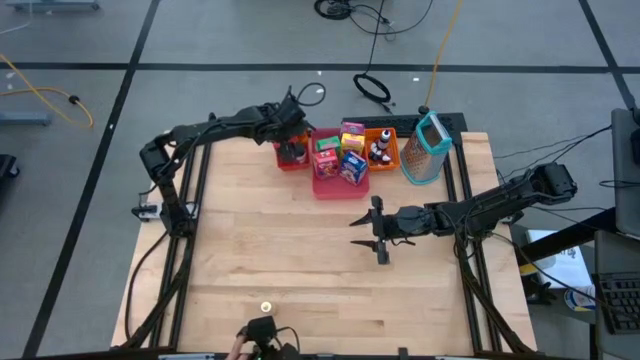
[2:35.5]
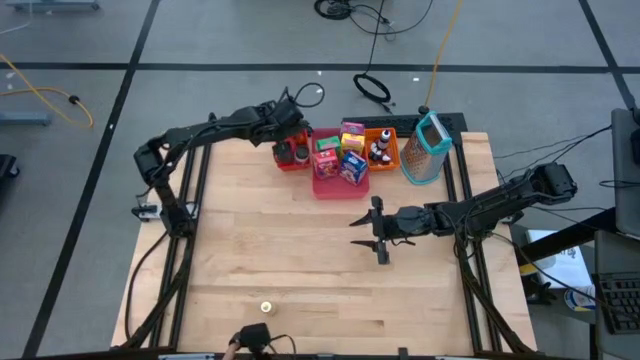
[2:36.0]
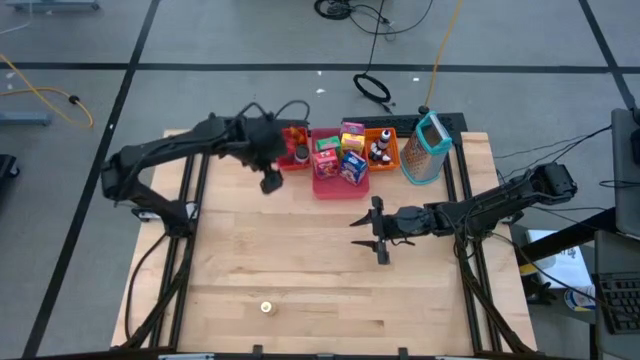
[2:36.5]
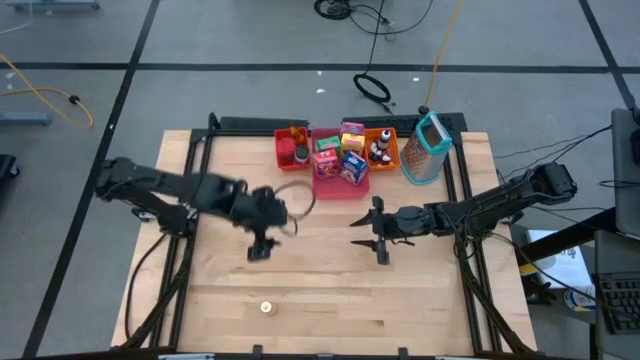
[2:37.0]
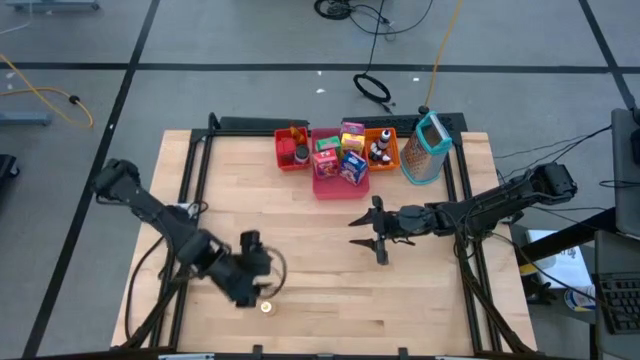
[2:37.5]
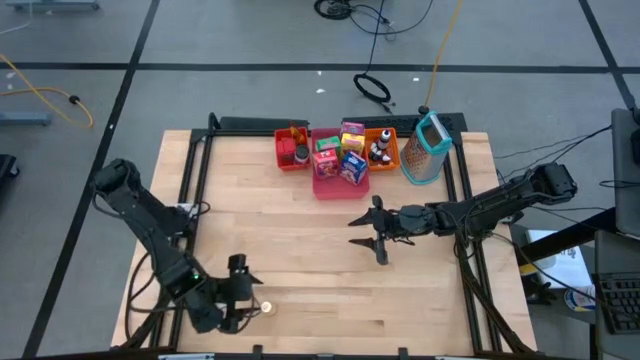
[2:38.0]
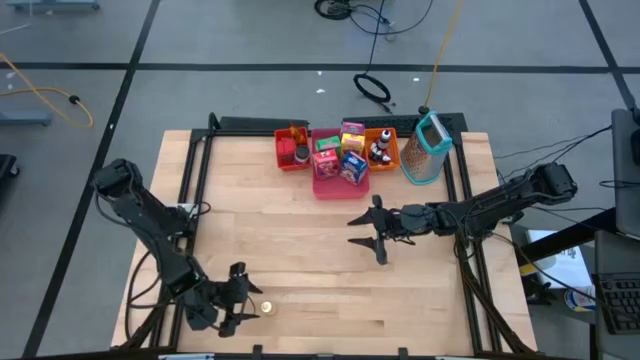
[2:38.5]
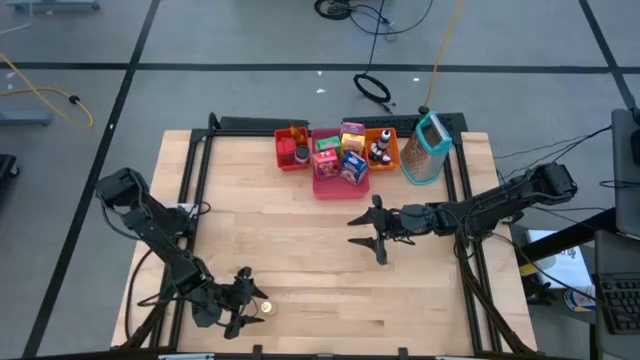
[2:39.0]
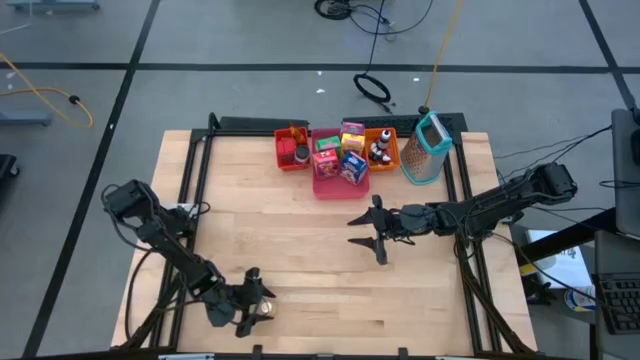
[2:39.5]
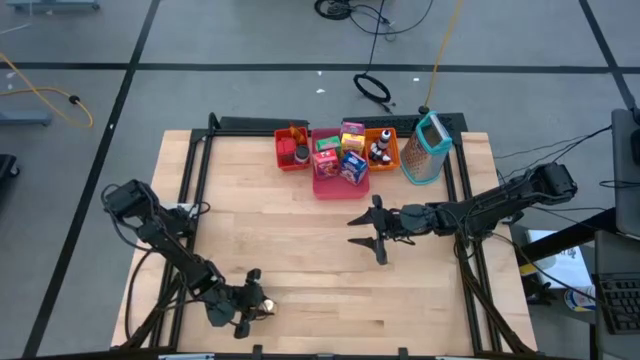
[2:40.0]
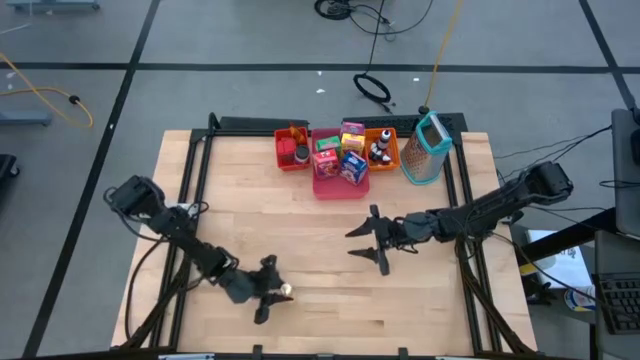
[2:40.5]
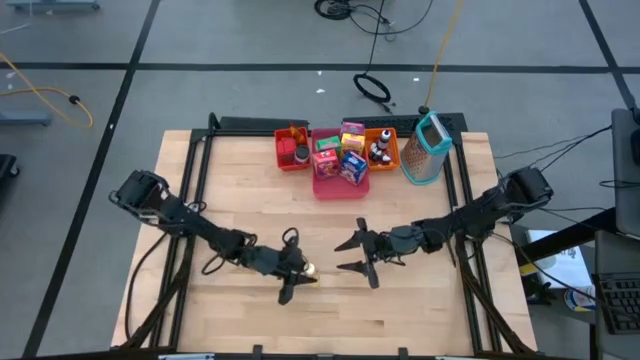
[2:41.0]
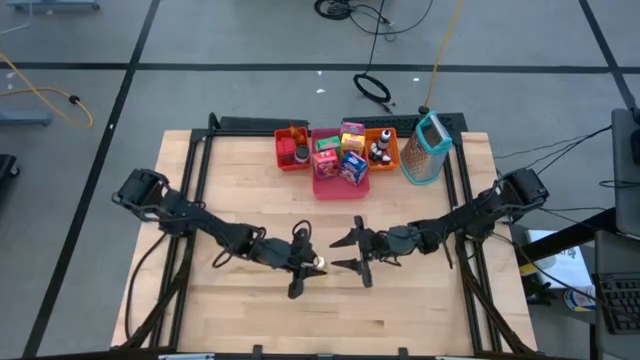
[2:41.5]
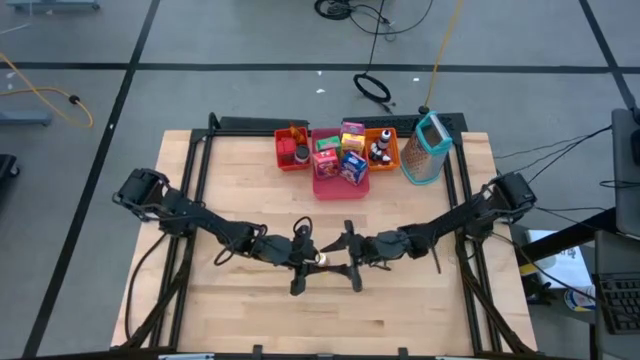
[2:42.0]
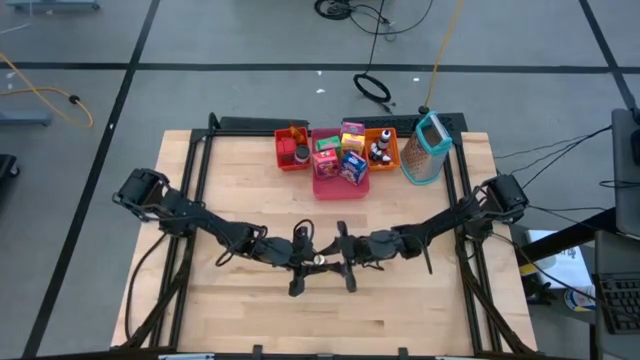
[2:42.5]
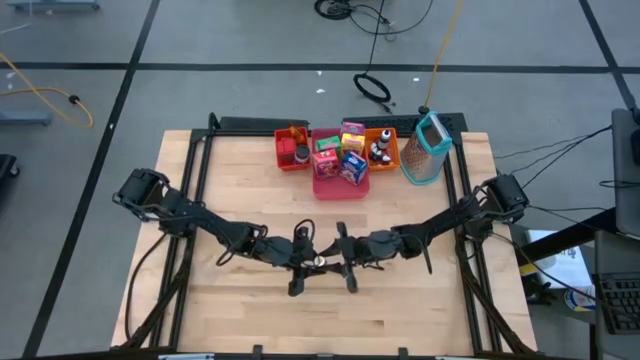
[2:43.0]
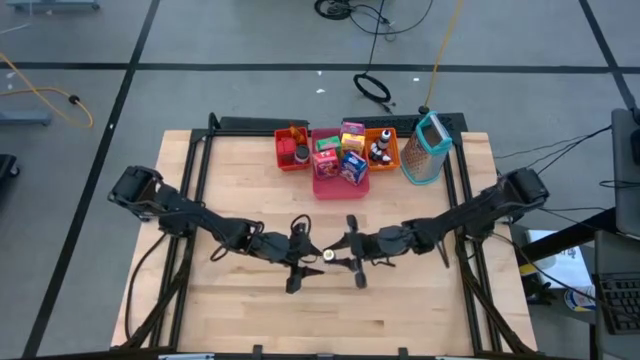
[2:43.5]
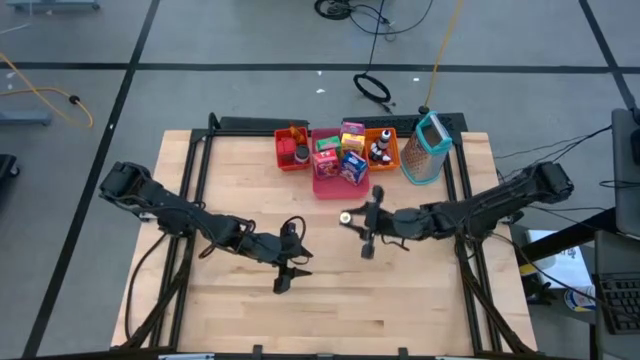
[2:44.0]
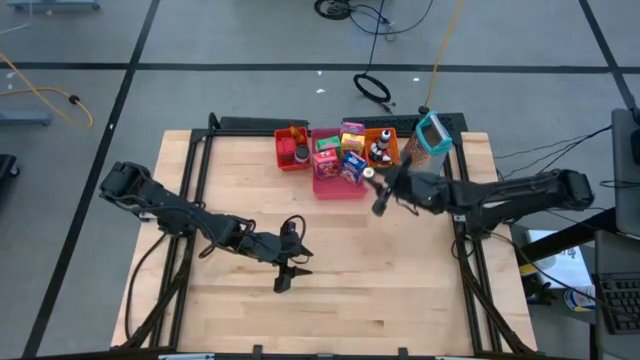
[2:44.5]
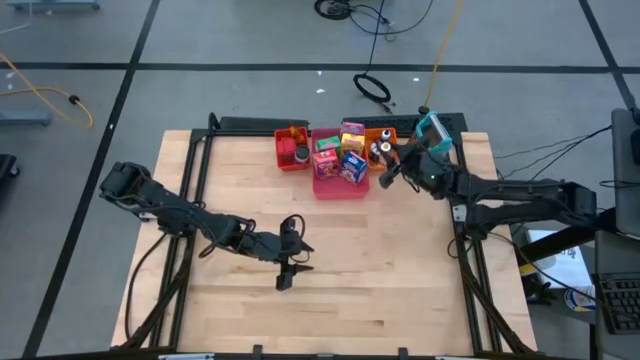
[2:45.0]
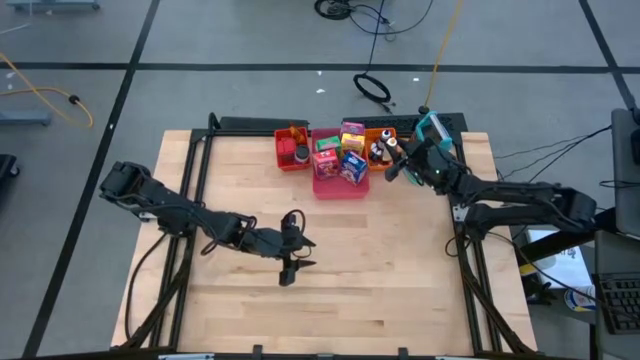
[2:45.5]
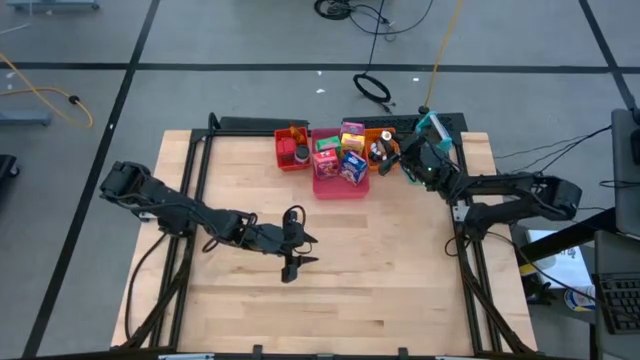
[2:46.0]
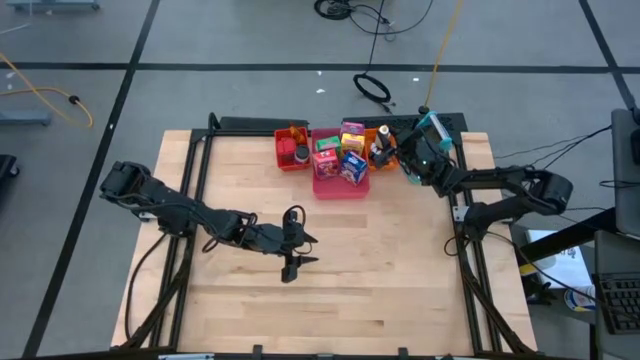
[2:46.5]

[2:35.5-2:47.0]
Task: Pick & Place Kitchen Items
Put the yellow food coloring bottle into the orange bin

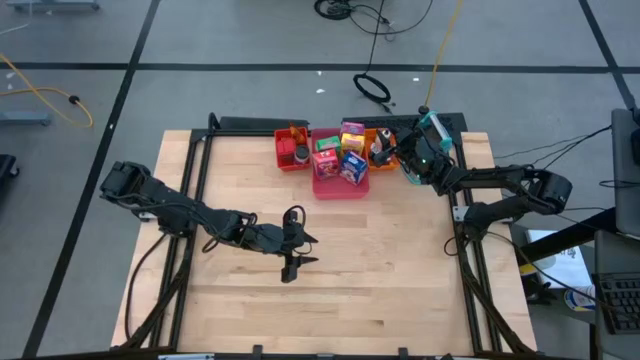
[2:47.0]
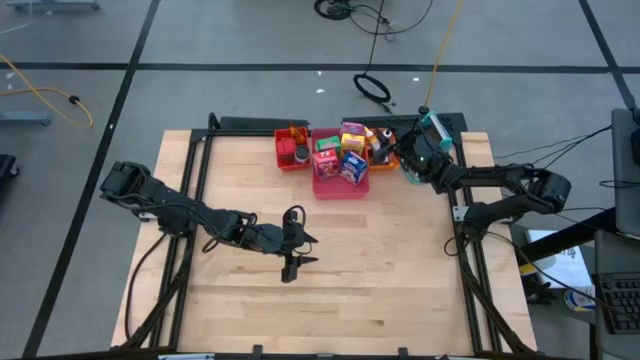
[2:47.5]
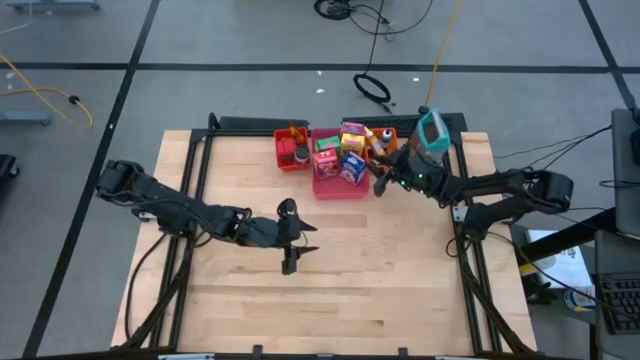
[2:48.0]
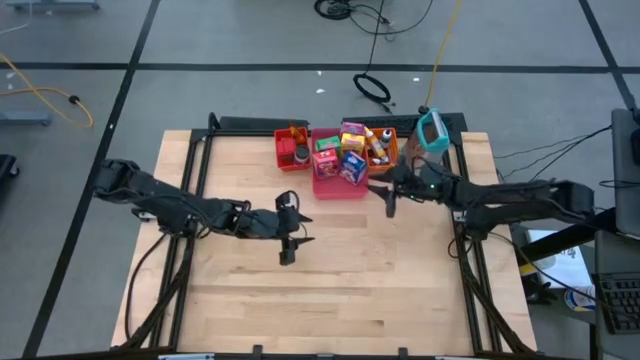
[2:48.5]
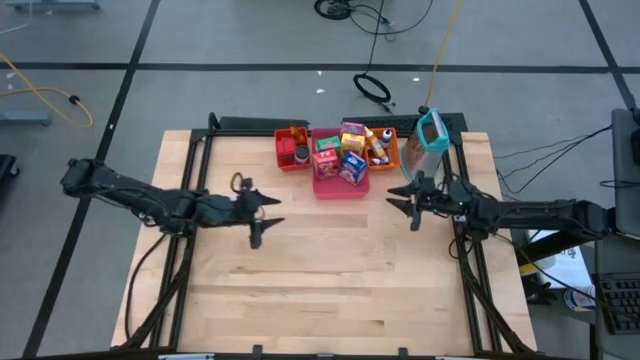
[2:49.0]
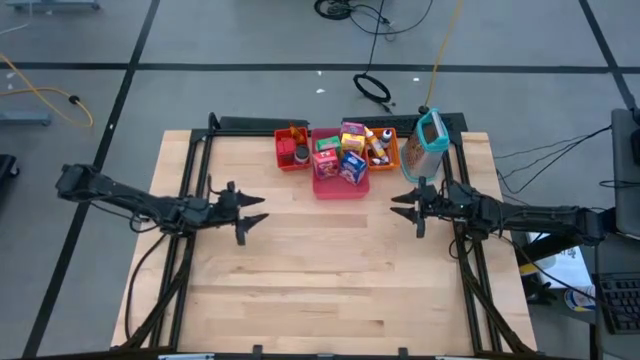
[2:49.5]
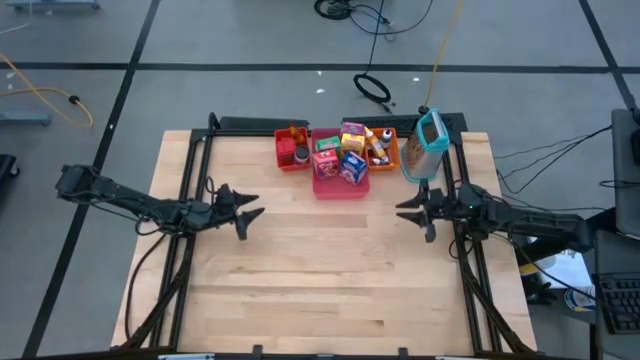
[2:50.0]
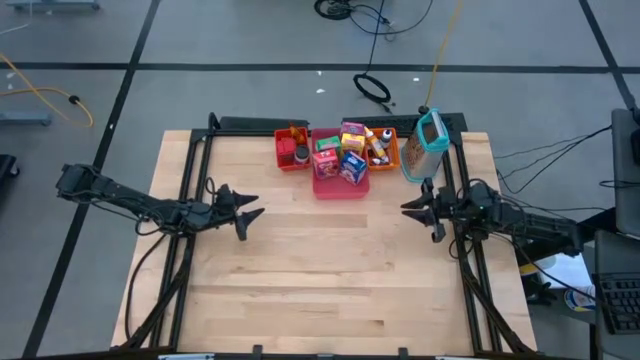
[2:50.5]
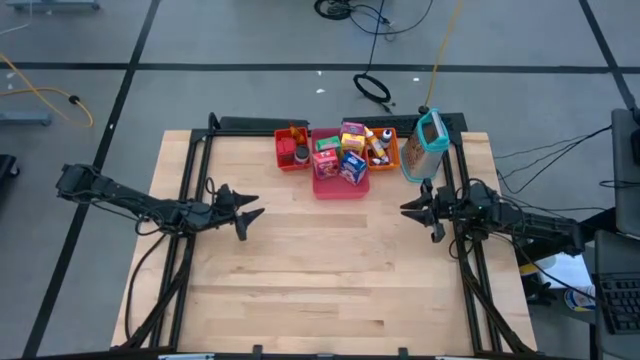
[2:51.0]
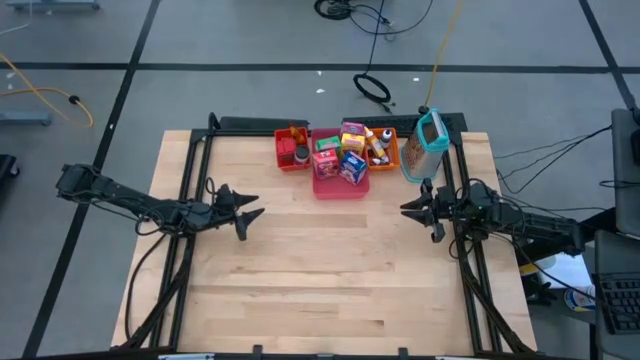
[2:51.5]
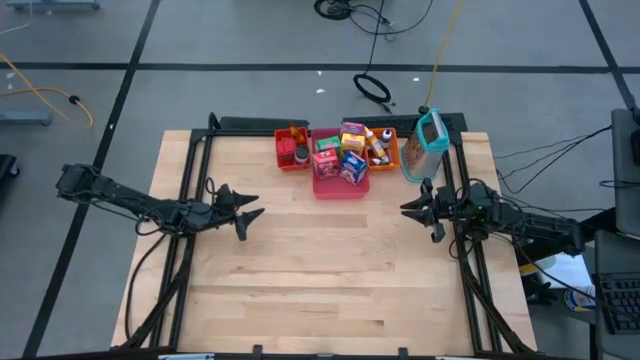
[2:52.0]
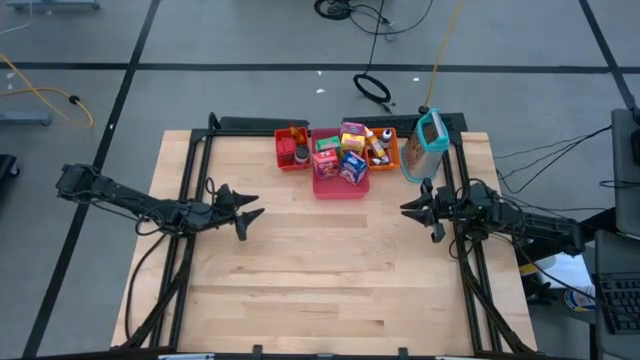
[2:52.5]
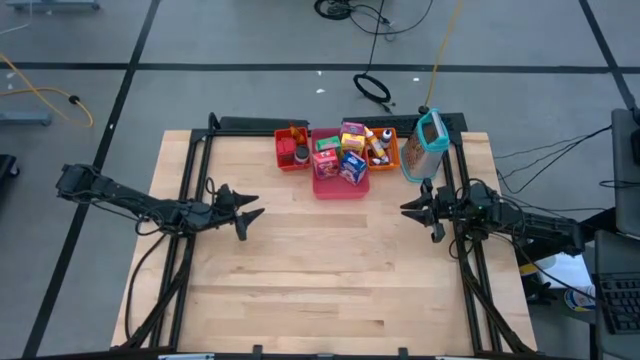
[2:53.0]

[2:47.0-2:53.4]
Return to Home Position

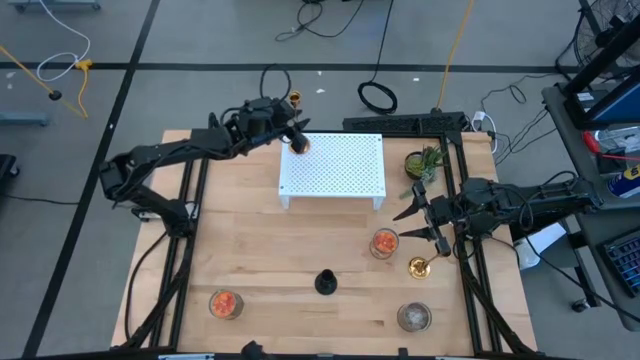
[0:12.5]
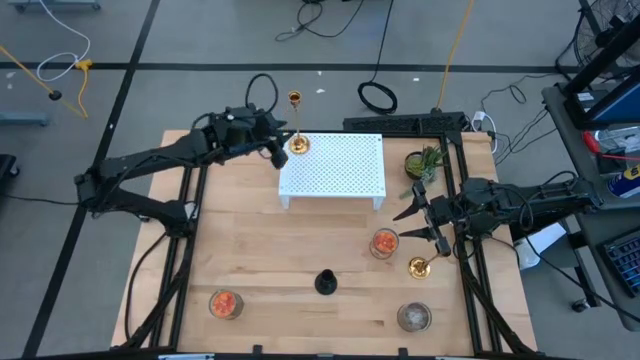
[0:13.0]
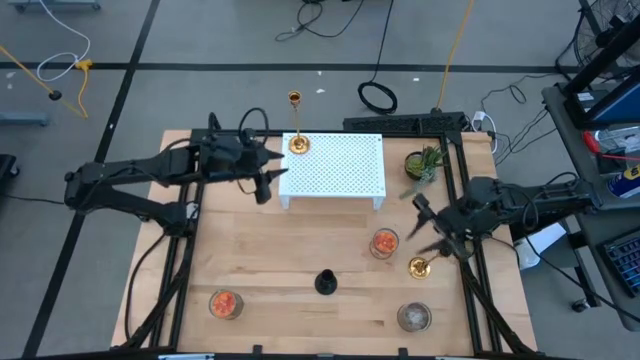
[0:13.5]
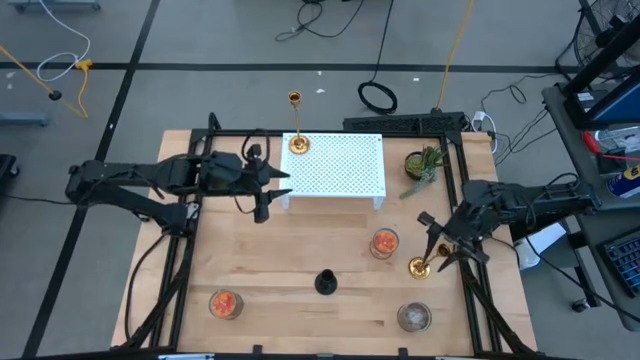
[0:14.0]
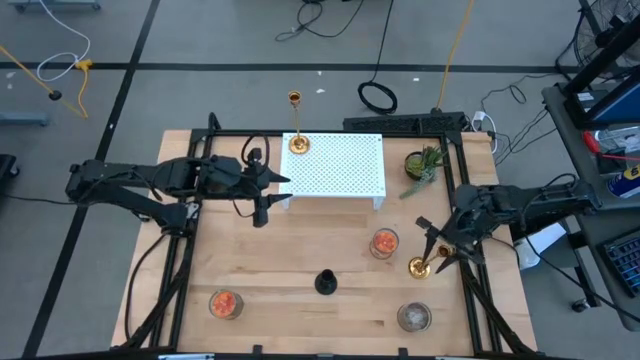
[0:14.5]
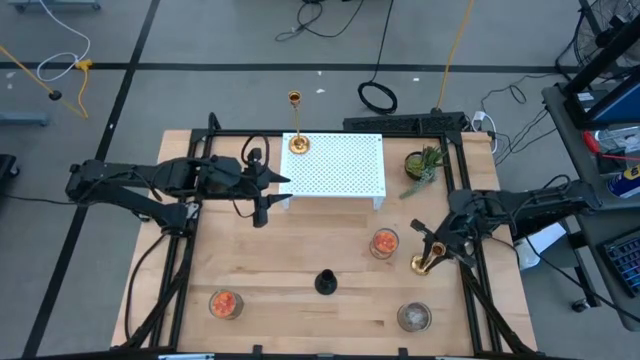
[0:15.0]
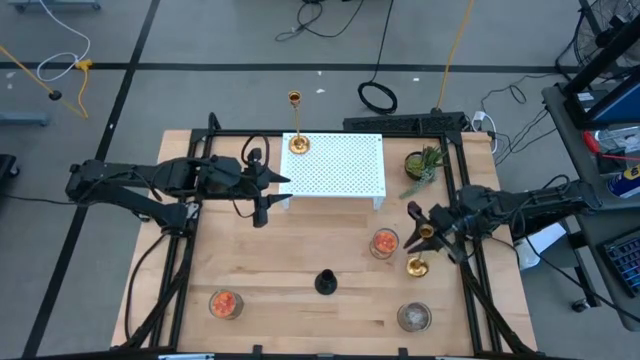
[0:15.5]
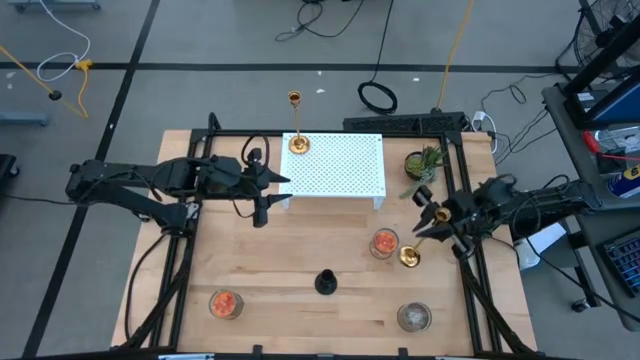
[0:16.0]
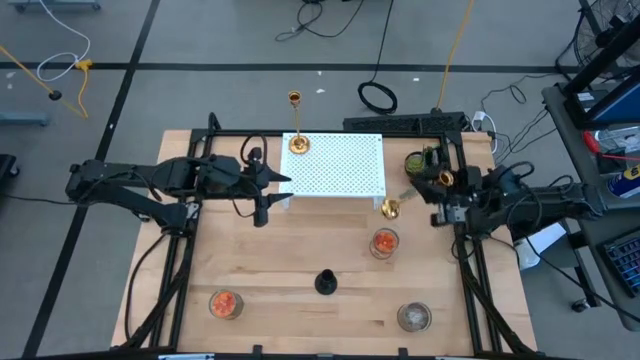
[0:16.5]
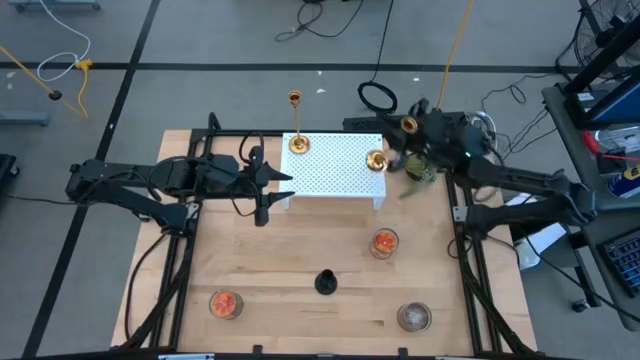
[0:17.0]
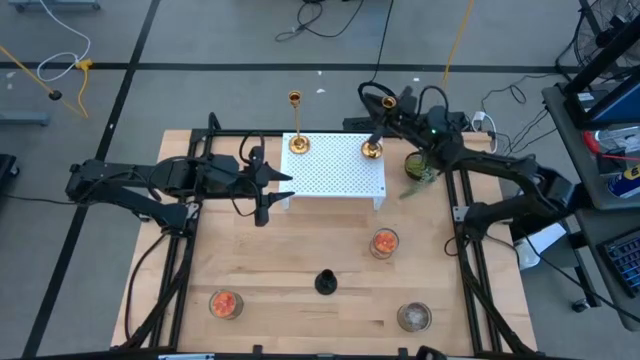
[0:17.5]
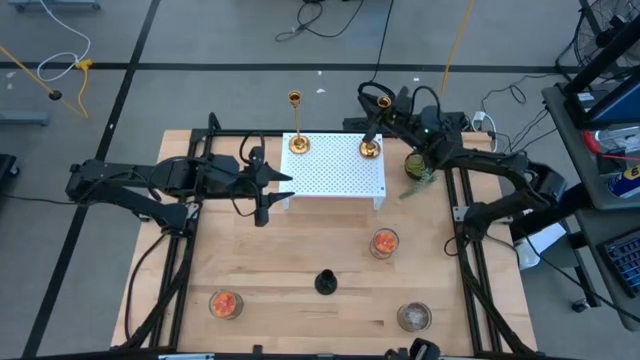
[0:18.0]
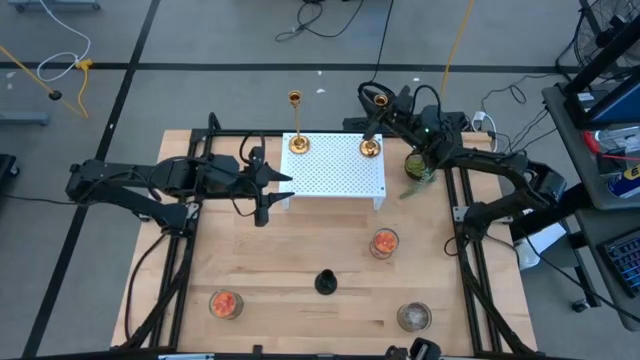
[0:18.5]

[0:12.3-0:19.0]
Task: Pick & Place candle stick holders
Put the golden candle holder on the shelf
